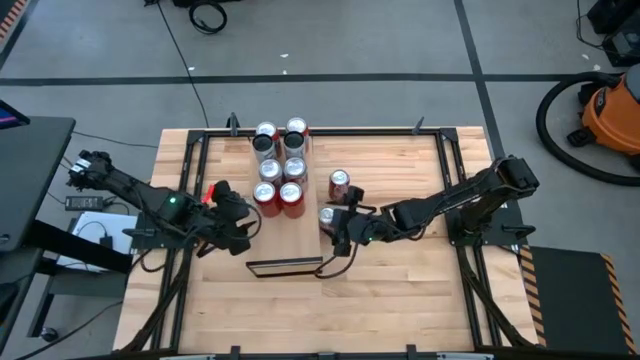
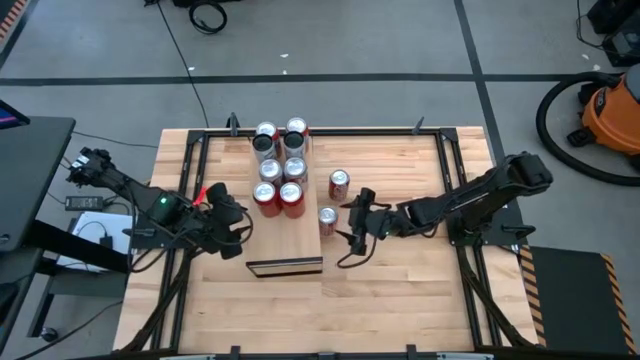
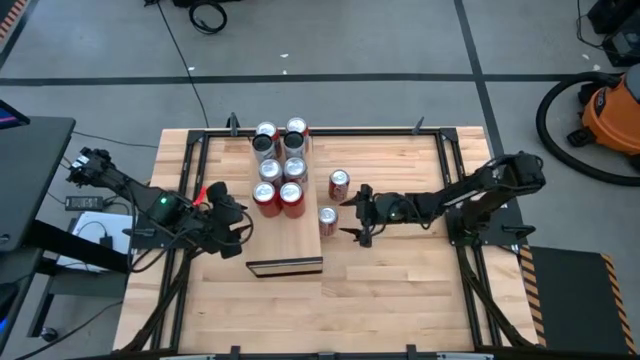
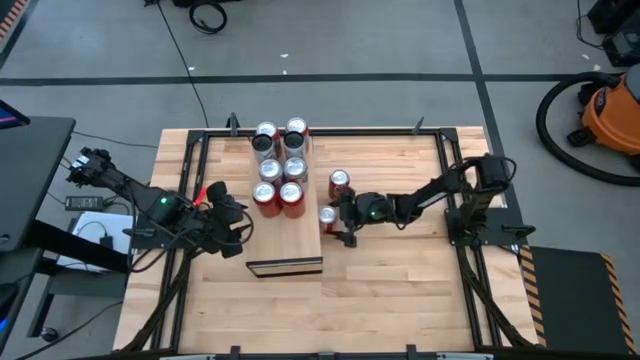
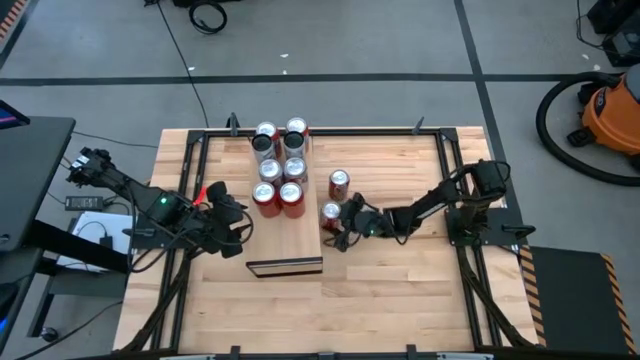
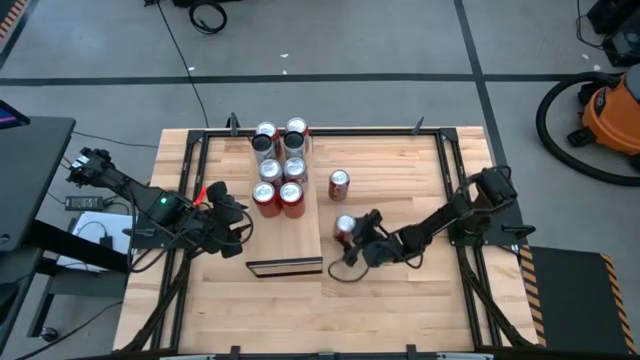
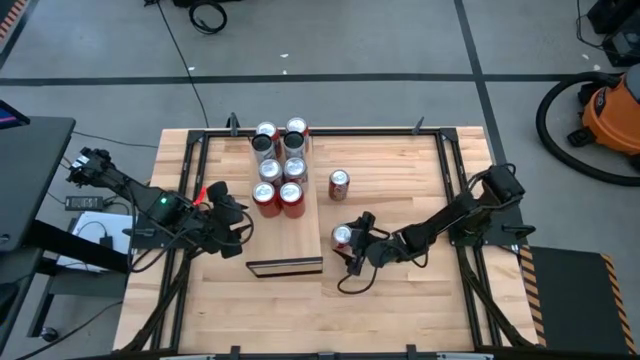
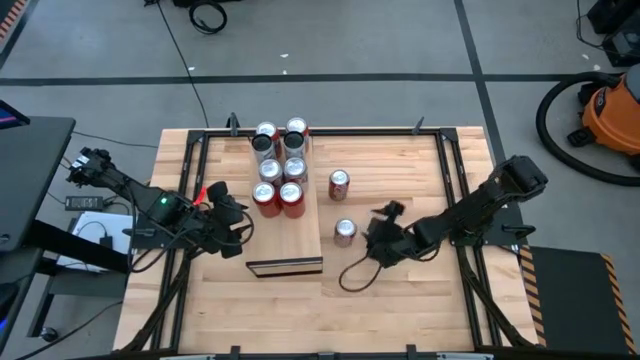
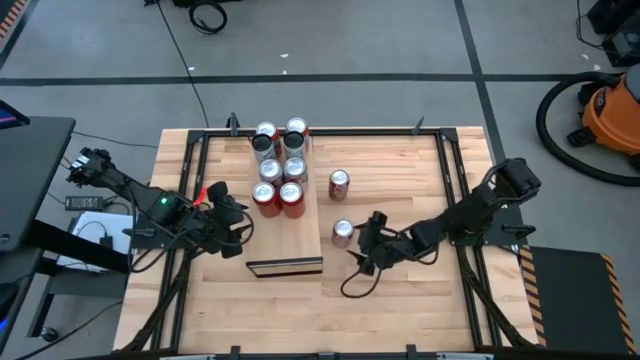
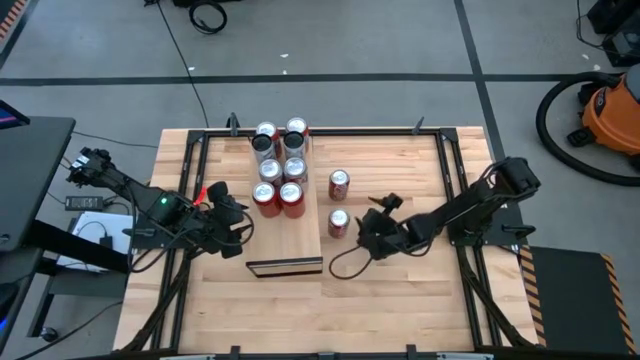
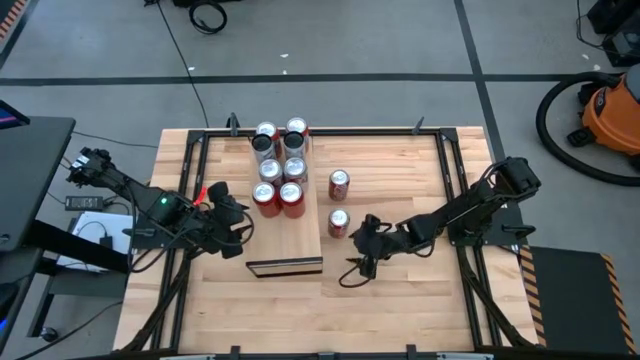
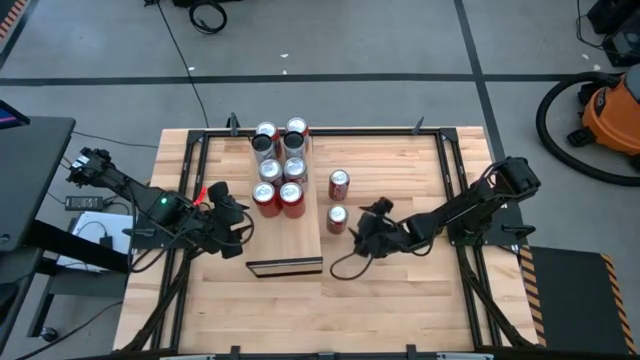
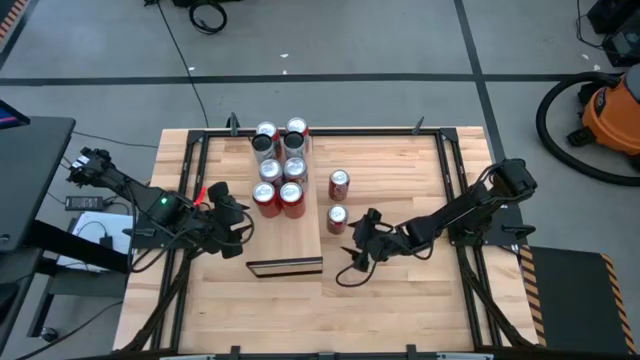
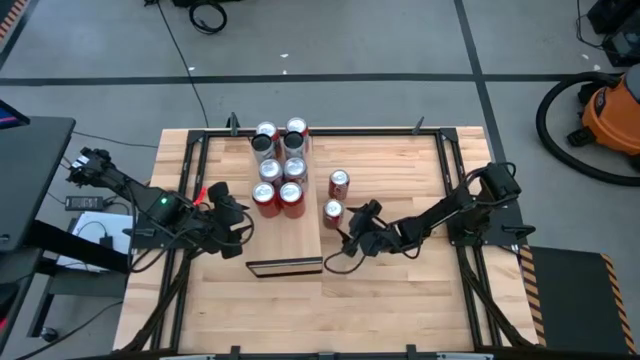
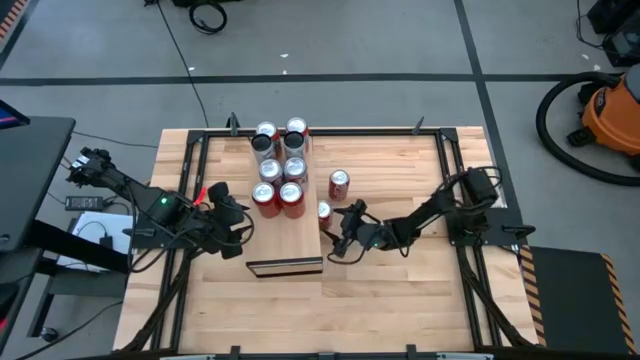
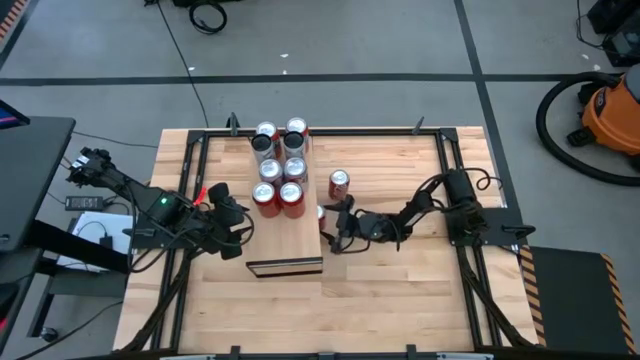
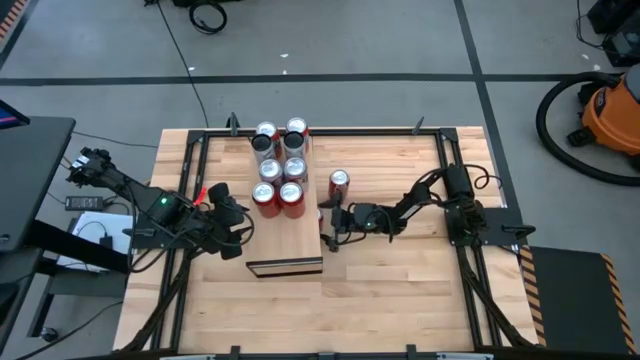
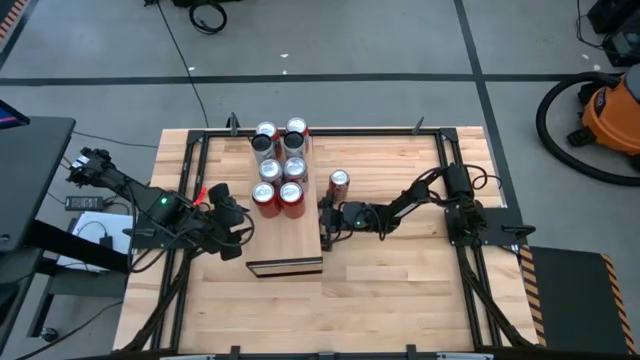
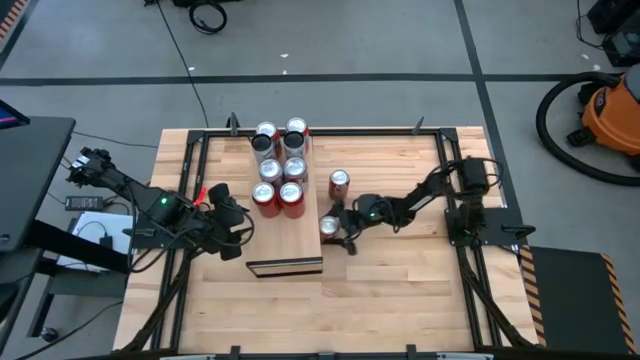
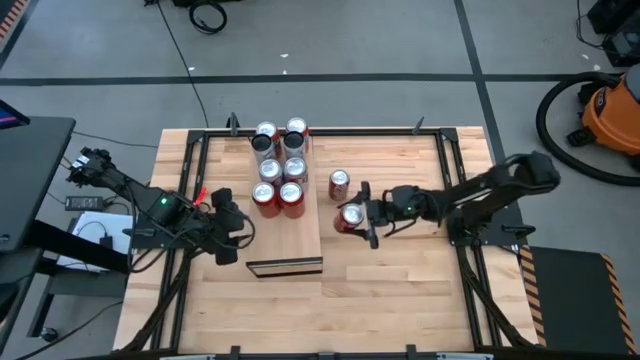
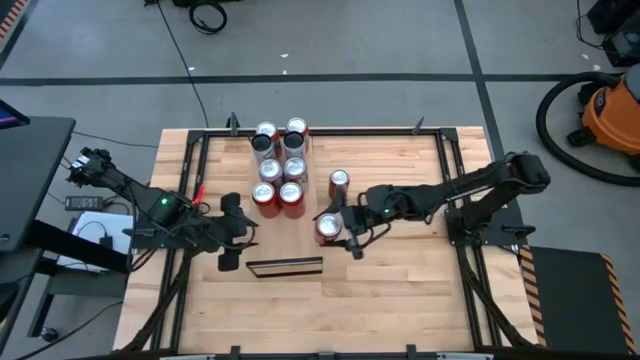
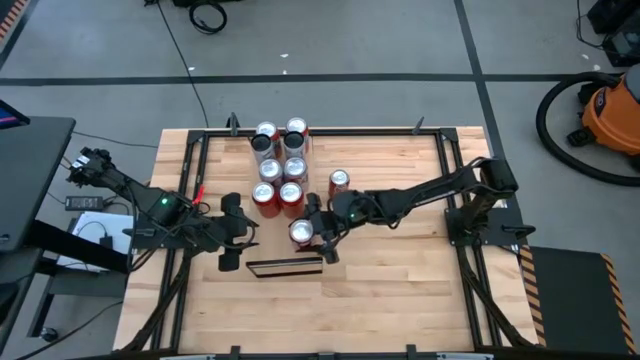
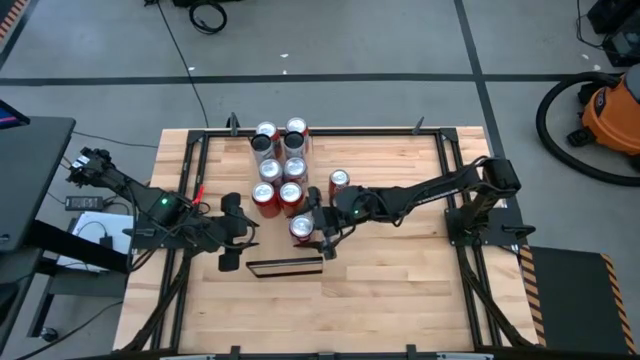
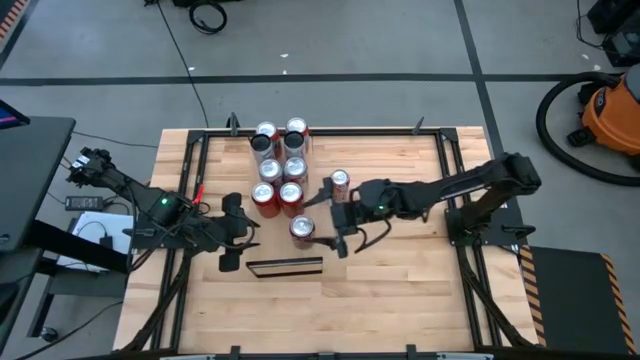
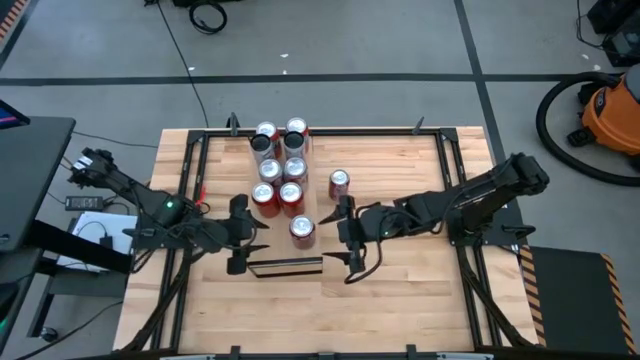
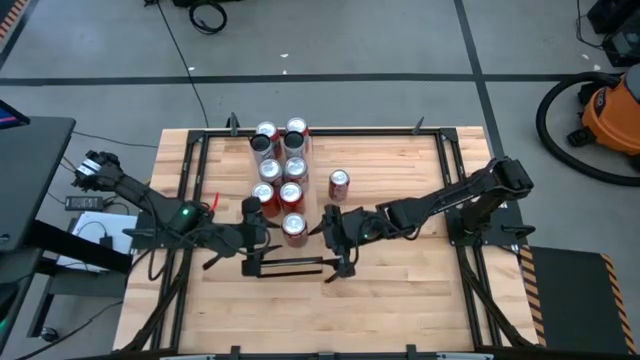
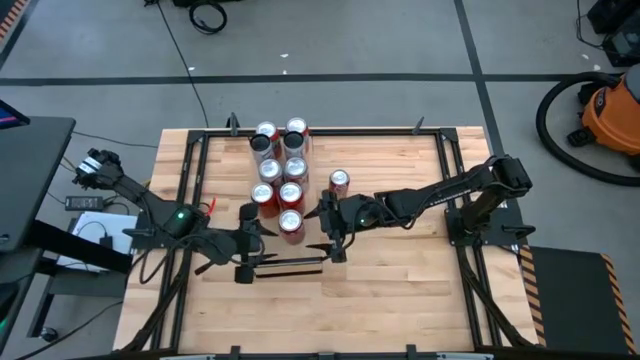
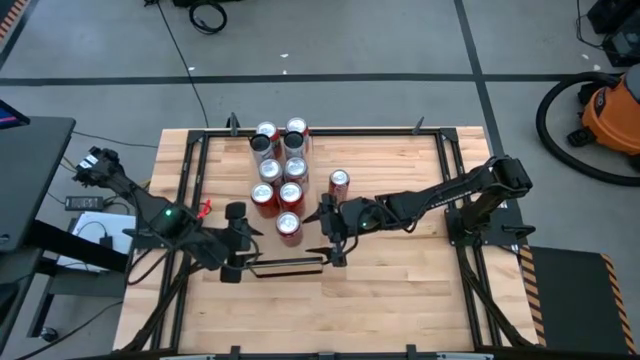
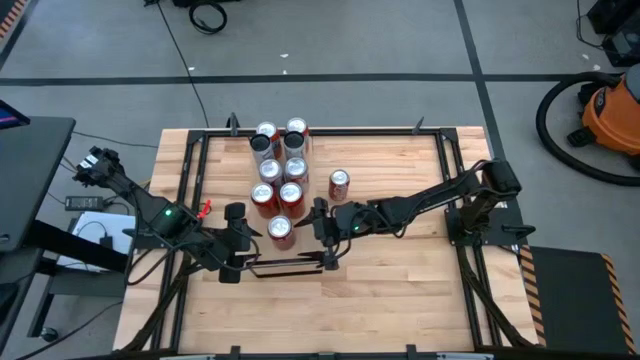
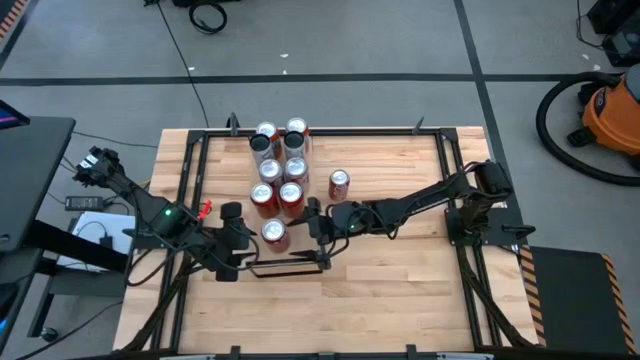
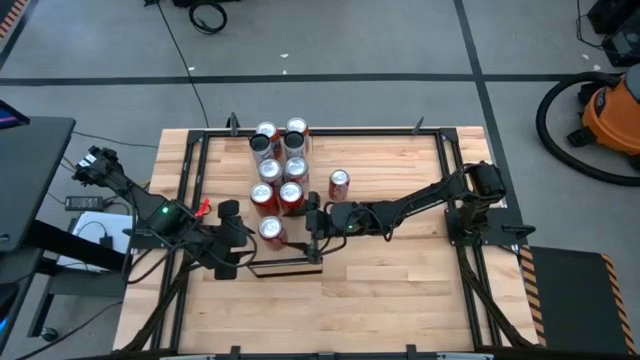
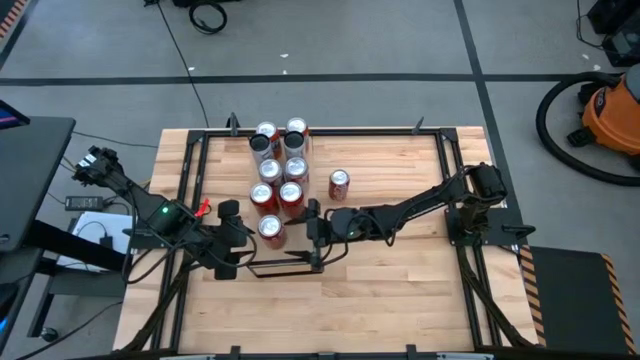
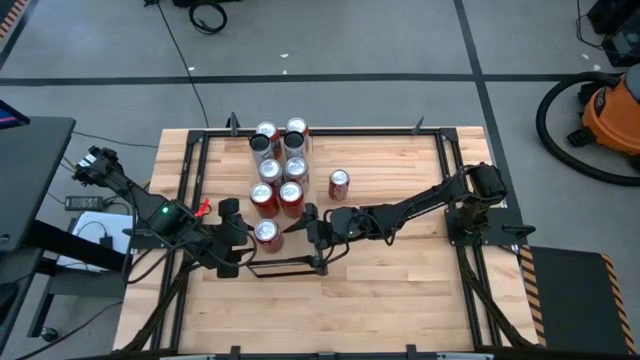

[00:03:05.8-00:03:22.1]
Task: Place canned beverage on shelf
Put the red-white soda can on the shelf

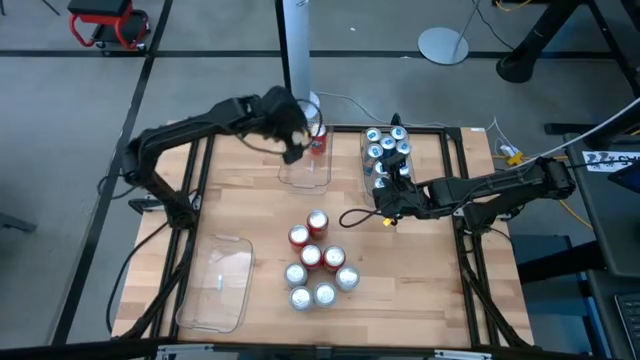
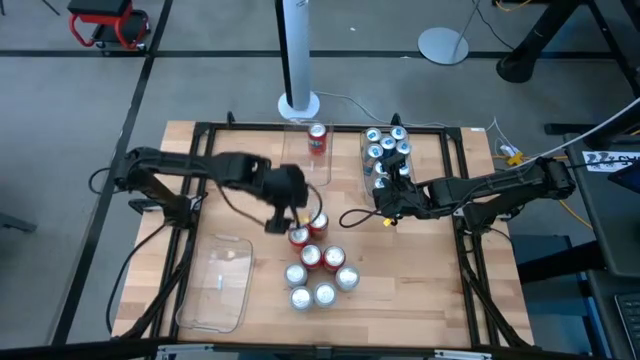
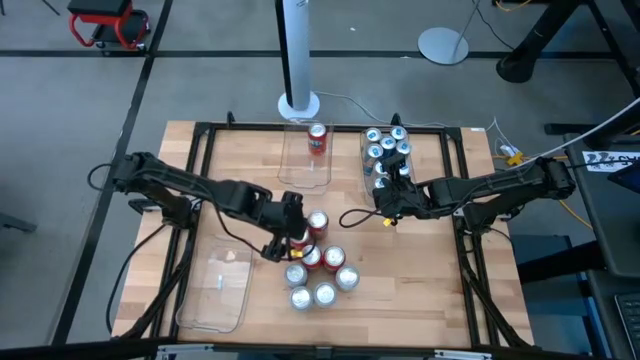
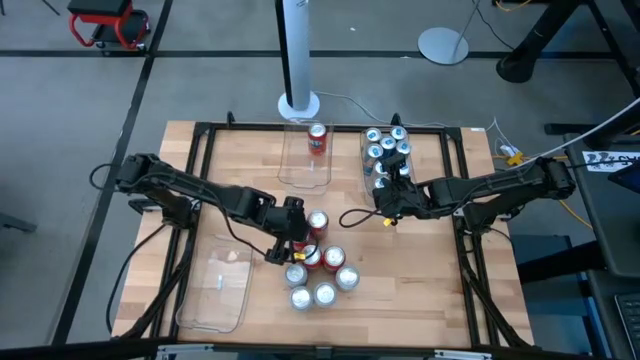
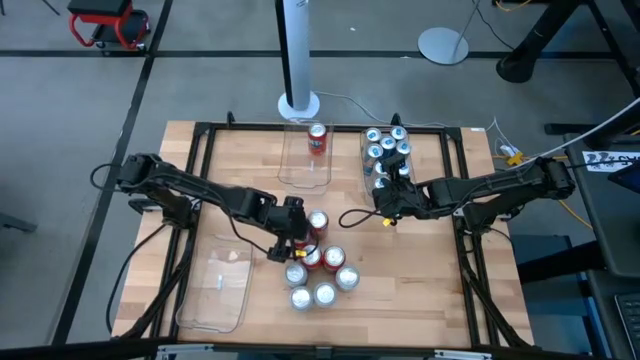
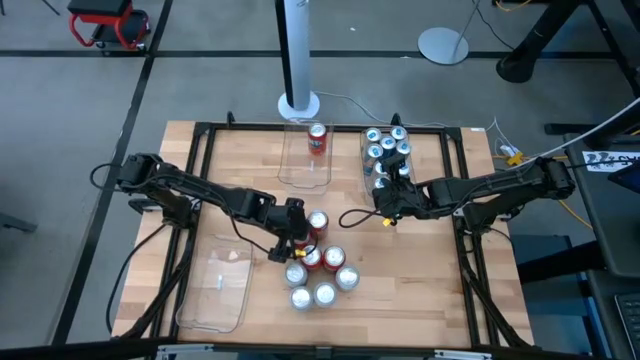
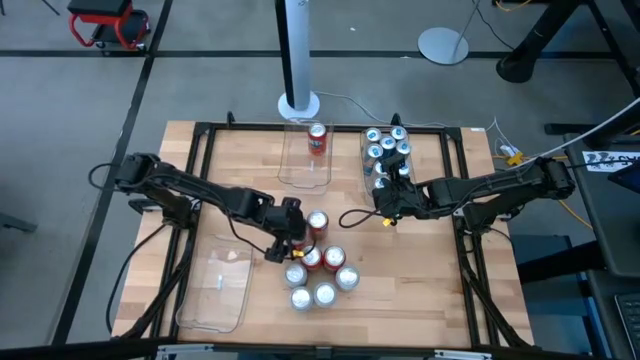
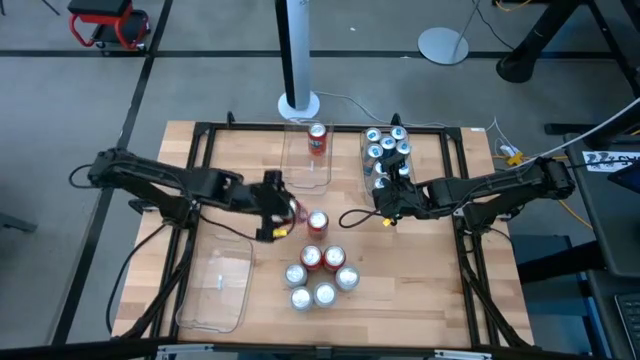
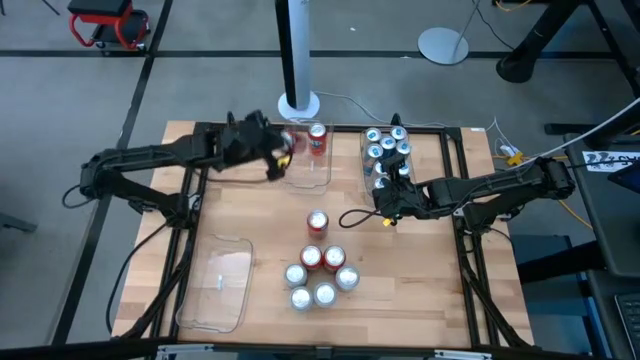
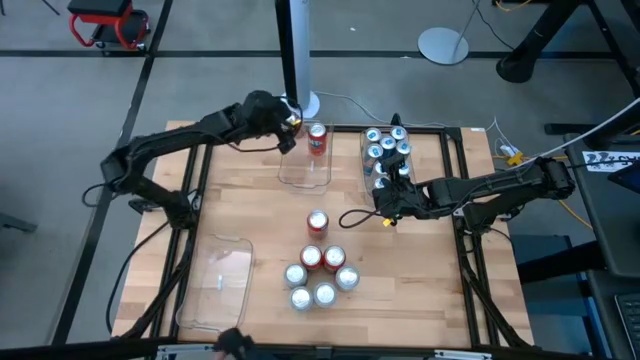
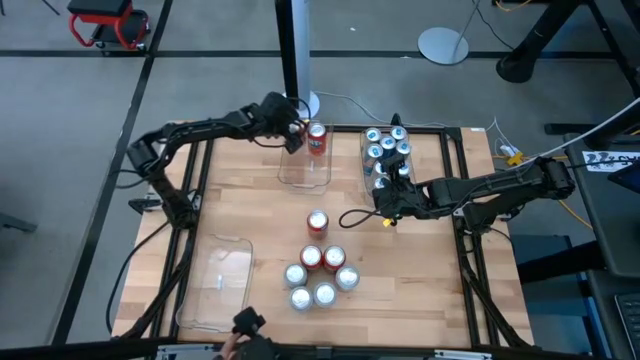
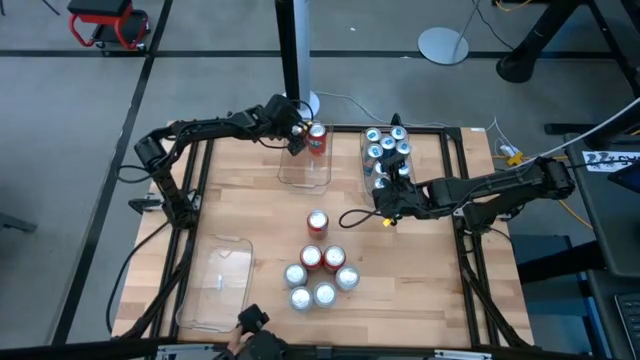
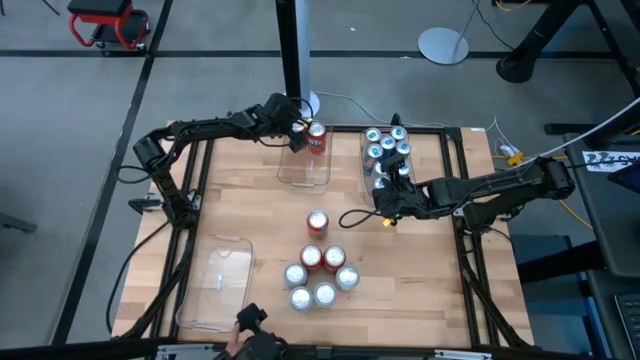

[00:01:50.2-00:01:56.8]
Task: Sort soda cans
Put the red soda can into the top center transparent bin
